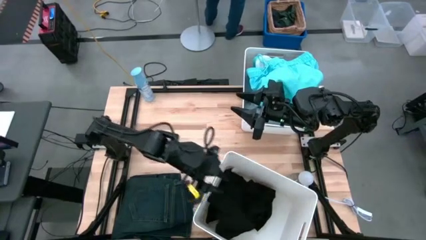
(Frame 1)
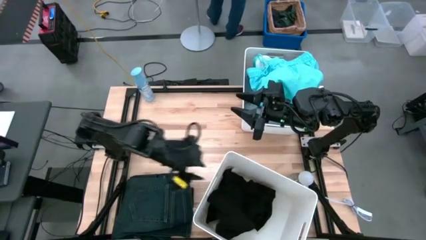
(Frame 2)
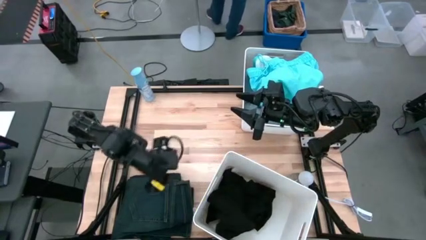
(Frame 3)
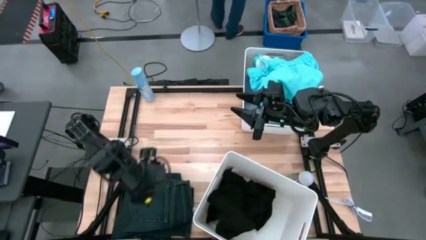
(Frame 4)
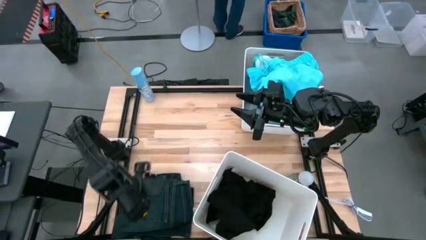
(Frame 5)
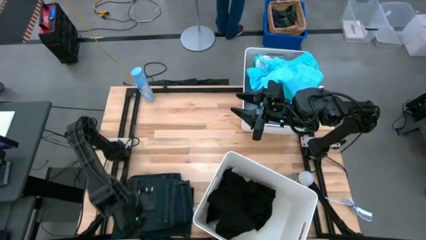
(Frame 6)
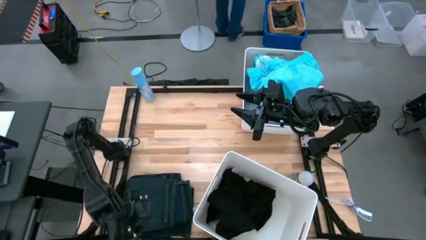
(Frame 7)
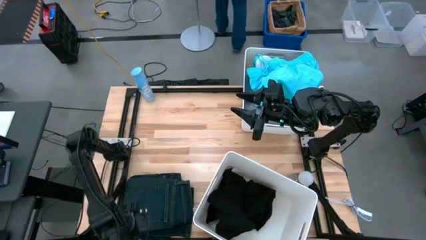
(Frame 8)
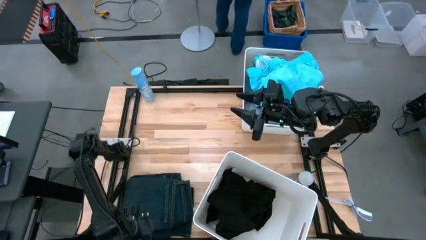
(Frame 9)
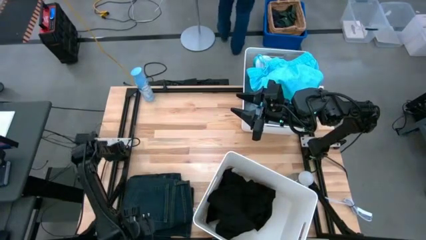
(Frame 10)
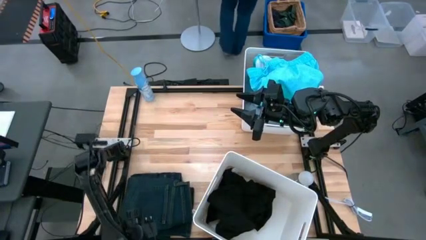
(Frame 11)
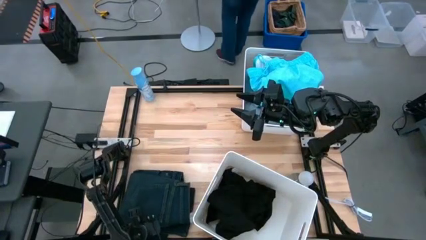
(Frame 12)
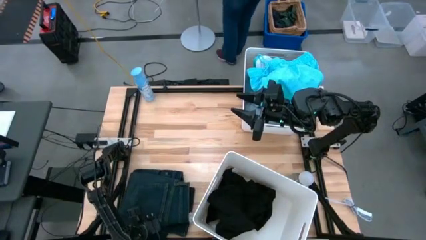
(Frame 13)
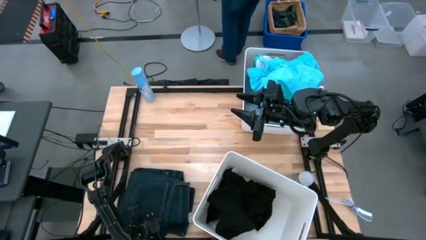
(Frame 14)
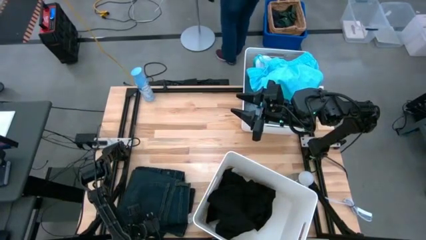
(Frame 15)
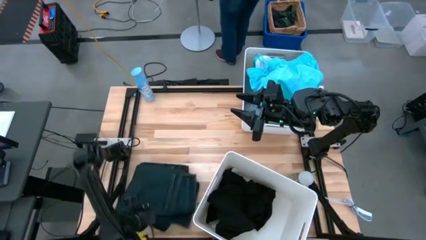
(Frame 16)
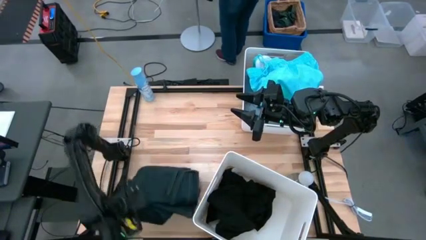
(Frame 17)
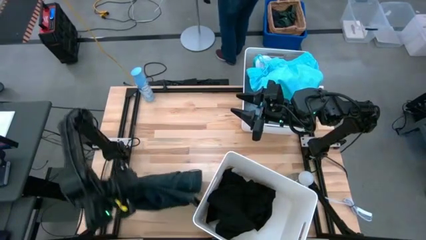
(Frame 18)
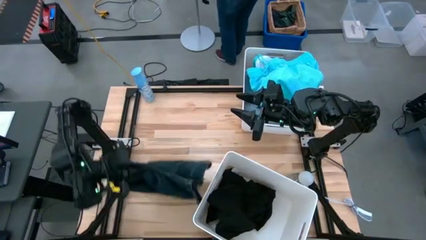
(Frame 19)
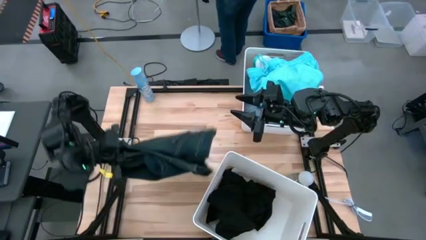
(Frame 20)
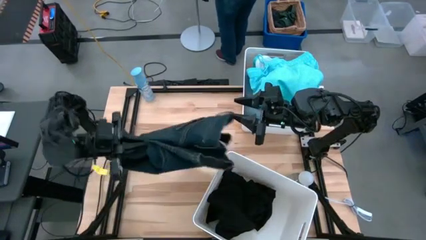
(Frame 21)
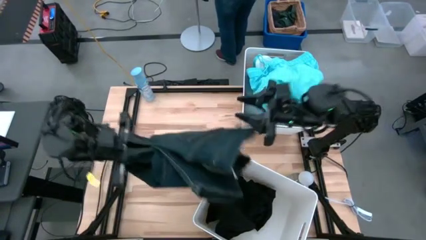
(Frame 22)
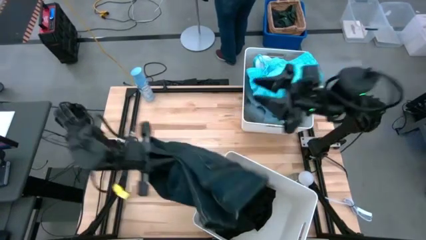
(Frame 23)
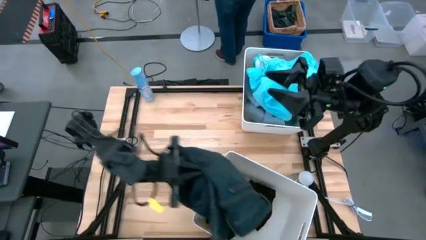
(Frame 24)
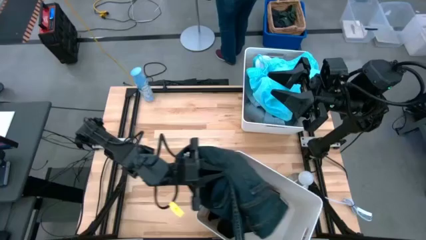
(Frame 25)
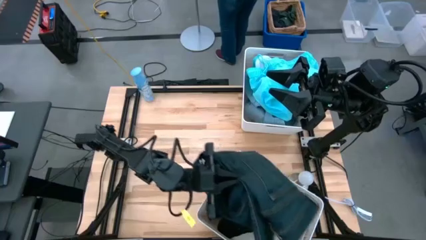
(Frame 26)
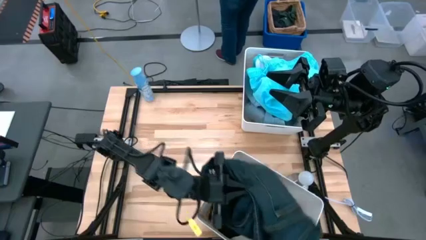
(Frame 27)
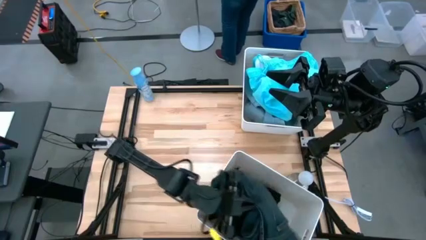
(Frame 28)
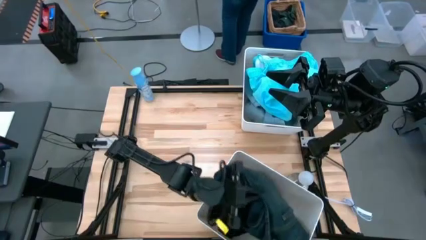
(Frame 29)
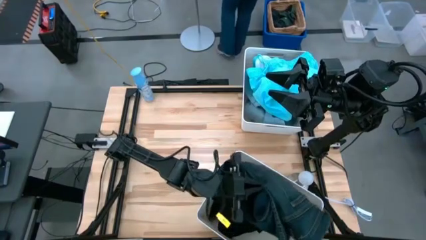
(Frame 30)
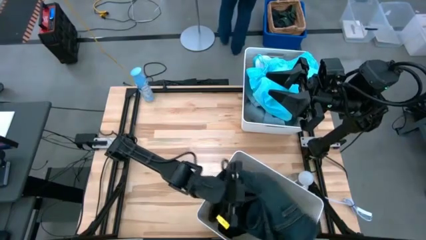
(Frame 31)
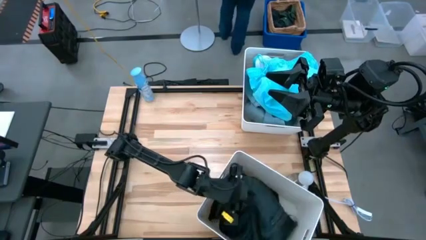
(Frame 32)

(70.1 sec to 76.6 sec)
Task: Sort clothes
Put the dark blue jeans into the bottom white laundry bin

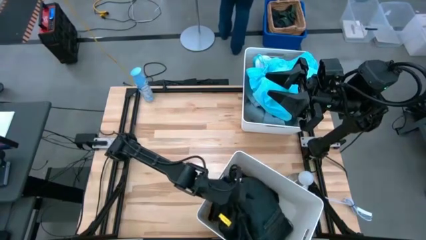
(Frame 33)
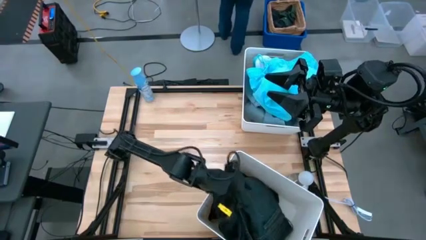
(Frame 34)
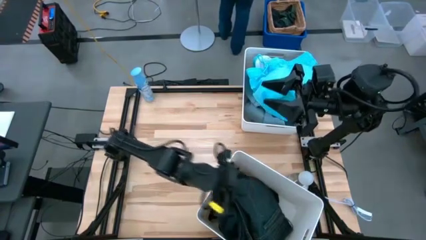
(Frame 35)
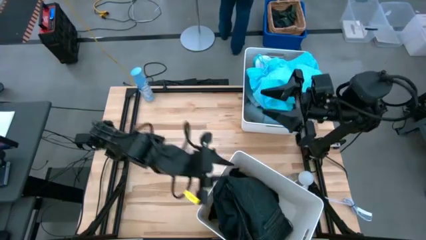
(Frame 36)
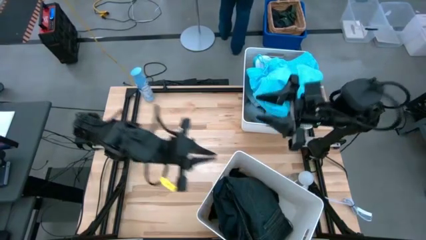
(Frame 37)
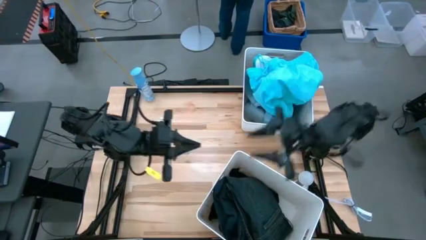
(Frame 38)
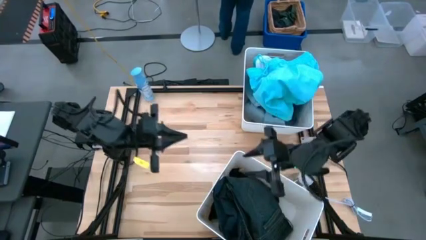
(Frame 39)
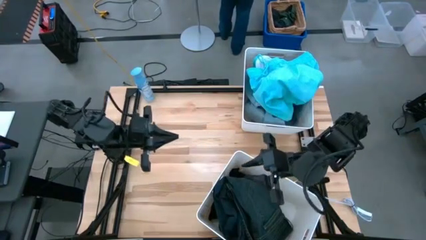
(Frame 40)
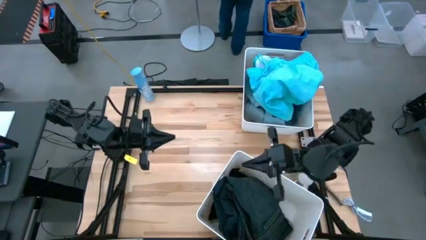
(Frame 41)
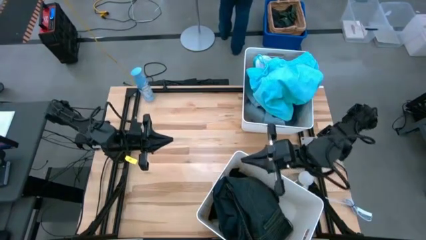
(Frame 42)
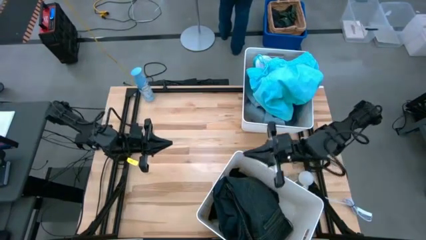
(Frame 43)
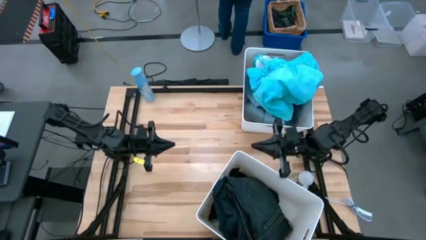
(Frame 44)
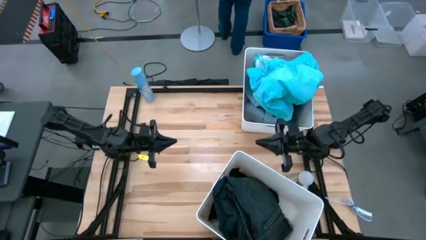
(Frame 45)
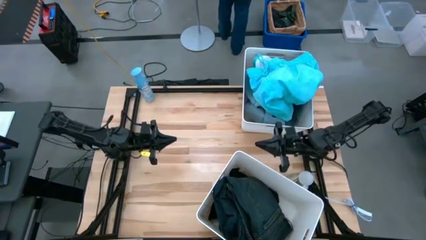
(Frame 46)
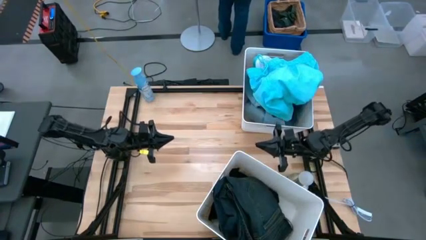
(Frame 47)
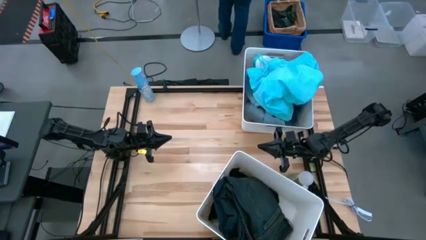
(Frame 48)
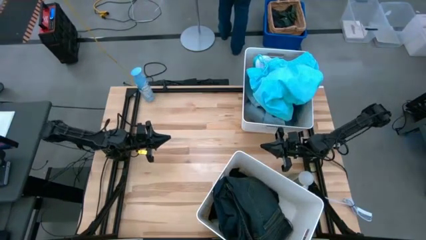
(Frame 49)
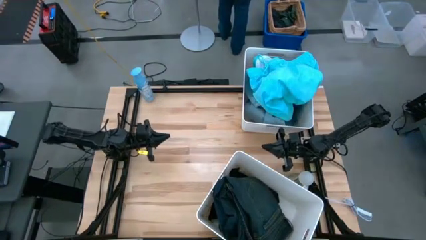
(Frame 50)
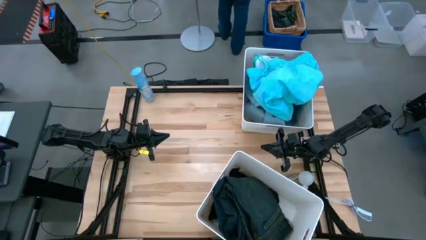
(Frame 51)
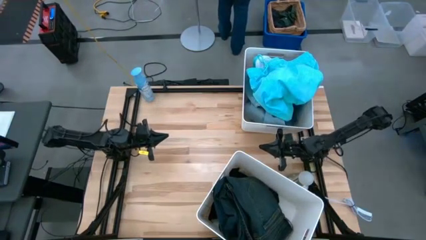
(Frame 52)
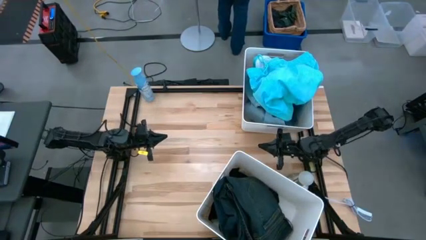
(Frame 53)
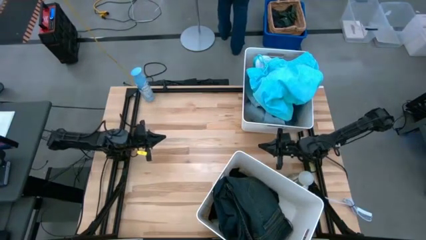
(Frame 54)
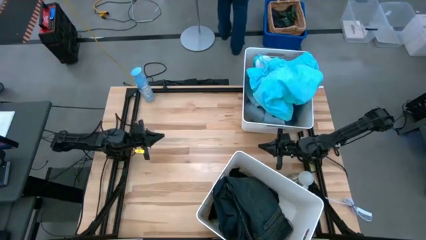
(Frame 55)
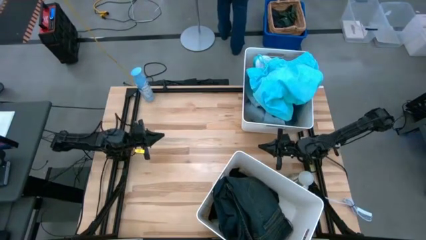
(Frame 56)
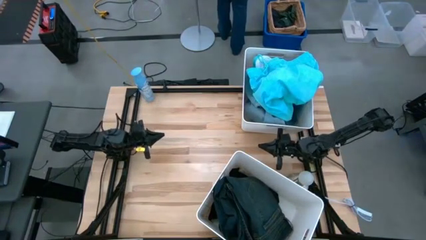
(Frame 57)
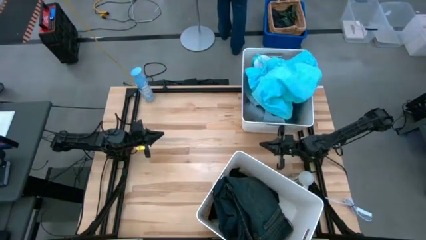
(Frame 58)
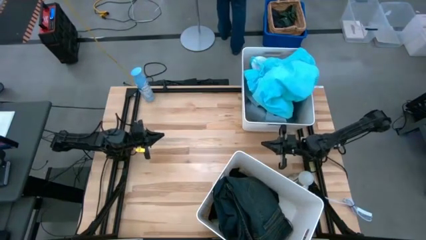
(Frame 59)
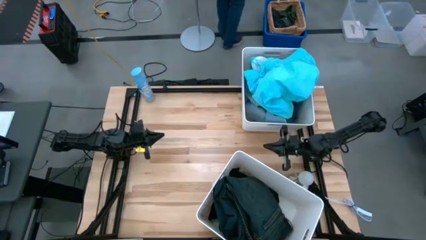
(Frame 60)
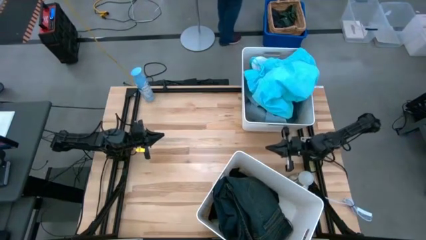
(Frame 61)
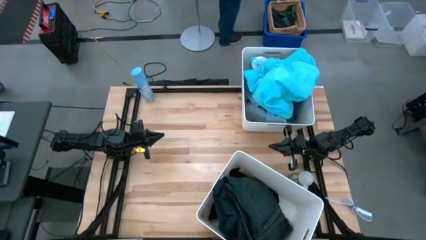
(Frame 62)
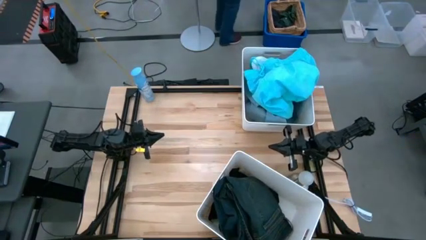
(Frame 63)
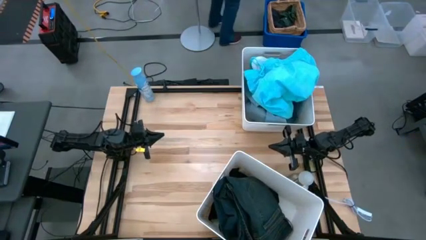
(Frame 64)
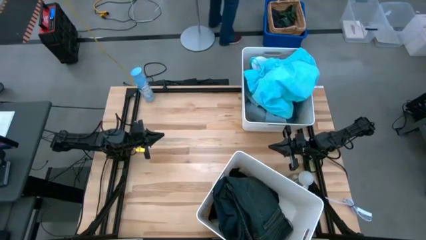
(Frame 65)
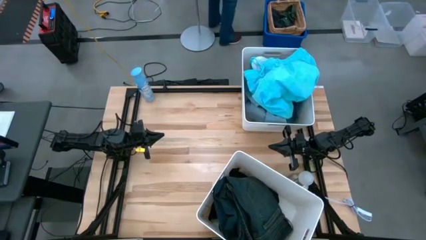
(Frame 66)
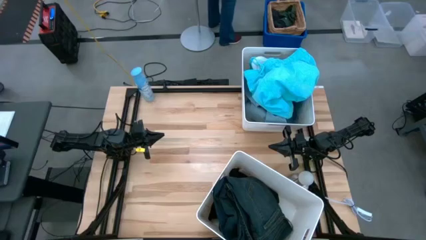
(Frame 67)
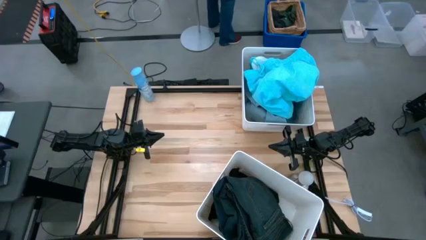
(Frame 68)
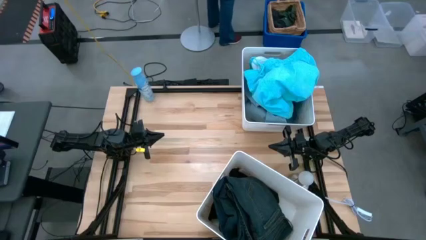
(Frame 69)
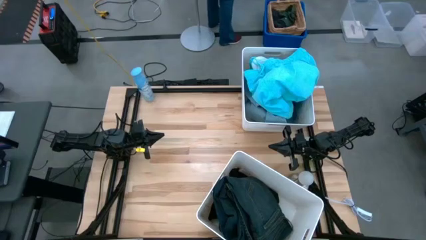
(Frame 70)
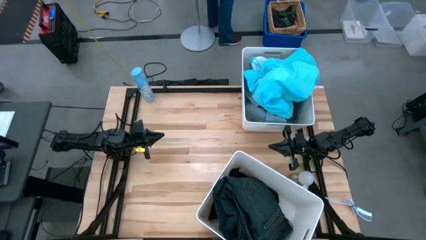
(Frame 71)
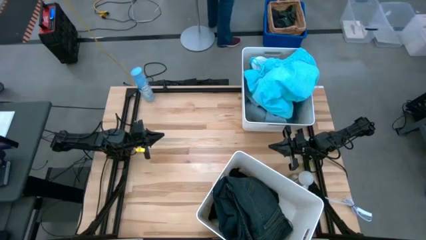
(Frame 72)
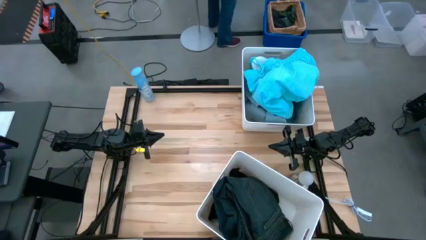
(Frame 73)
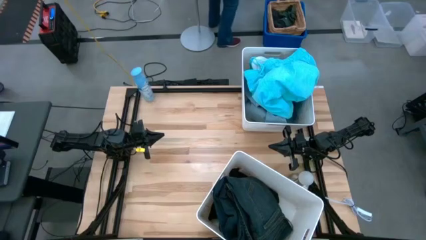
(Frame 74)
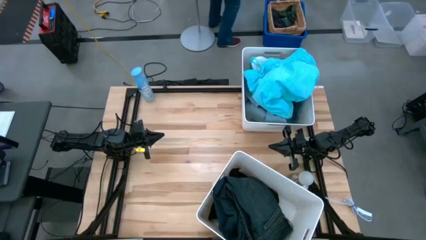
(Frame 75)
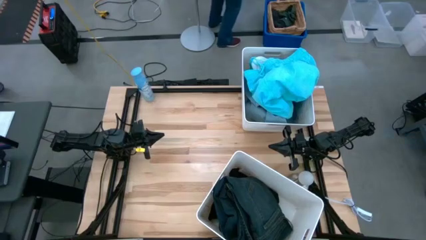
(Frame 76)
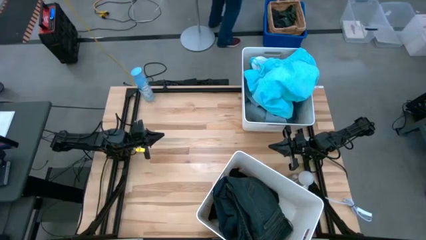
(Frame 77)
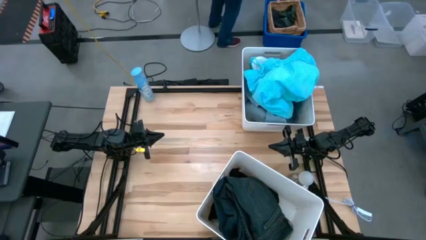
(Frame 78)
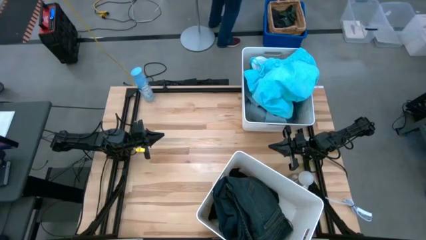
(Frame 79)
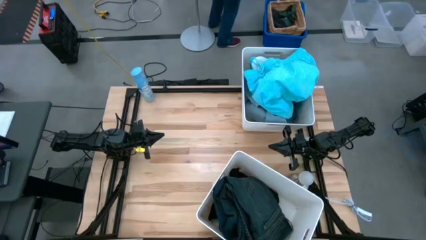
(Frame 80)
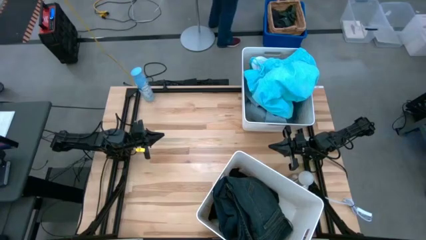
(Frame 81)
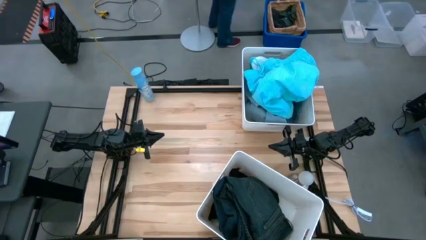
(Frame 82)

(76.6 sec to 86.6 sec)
Return to Home Position
